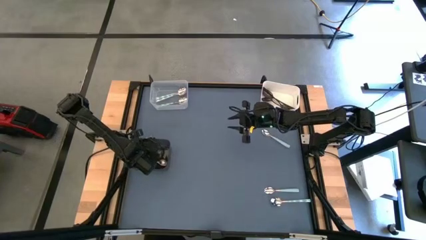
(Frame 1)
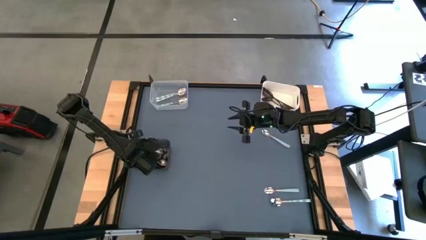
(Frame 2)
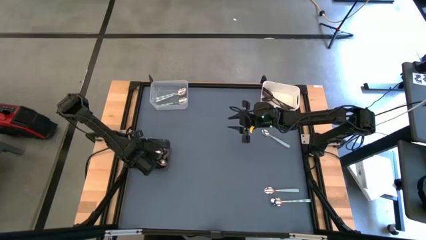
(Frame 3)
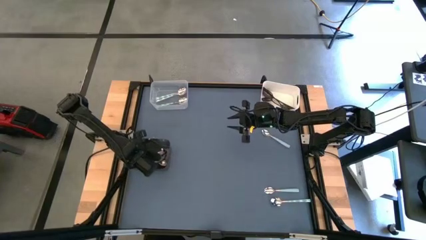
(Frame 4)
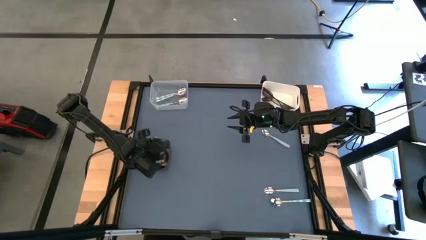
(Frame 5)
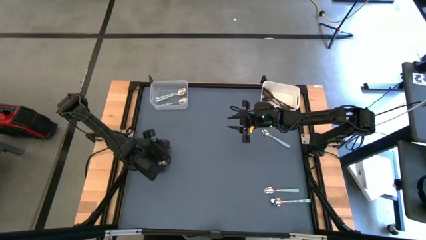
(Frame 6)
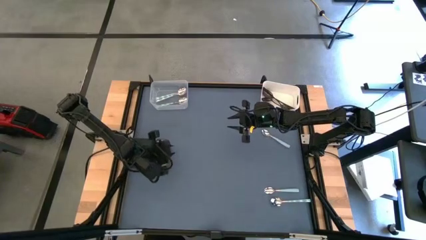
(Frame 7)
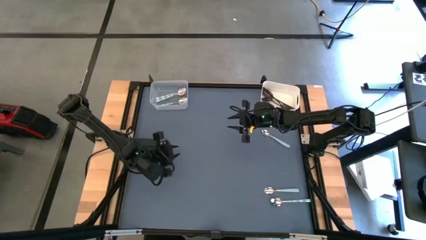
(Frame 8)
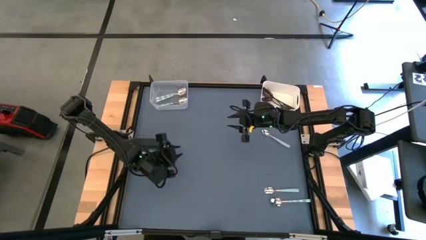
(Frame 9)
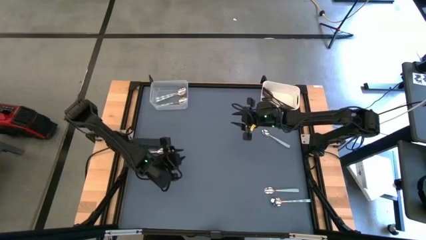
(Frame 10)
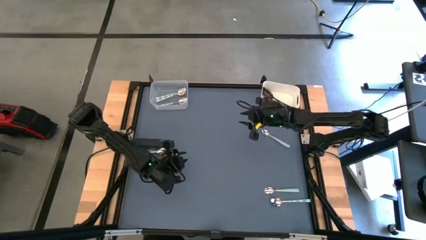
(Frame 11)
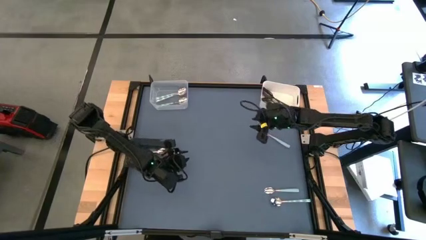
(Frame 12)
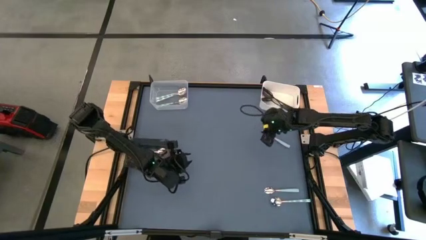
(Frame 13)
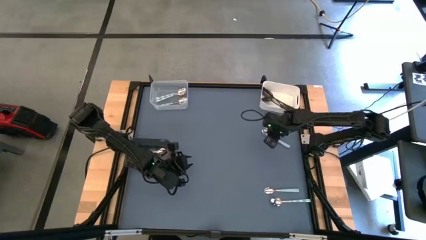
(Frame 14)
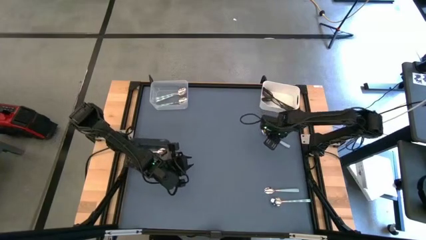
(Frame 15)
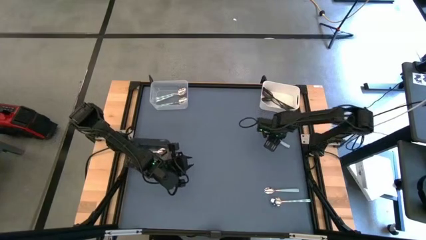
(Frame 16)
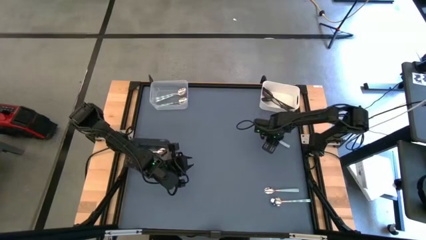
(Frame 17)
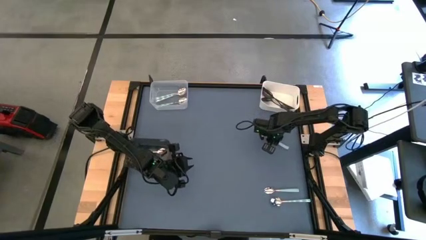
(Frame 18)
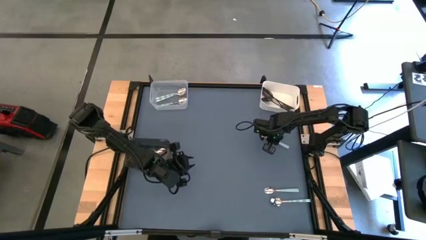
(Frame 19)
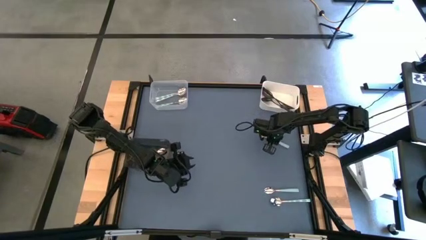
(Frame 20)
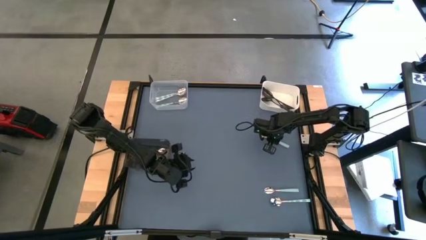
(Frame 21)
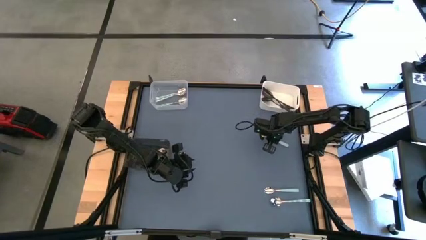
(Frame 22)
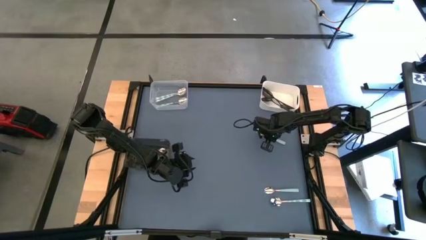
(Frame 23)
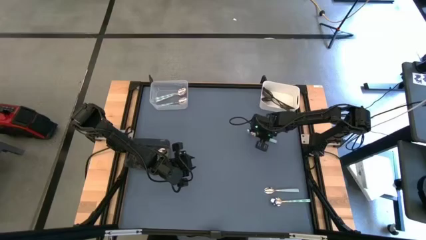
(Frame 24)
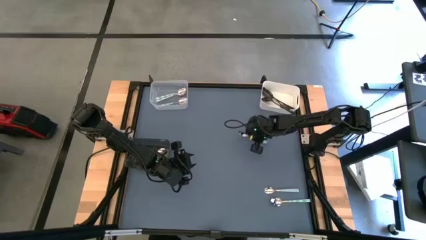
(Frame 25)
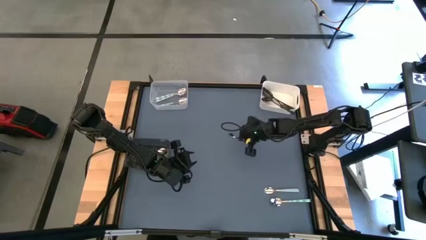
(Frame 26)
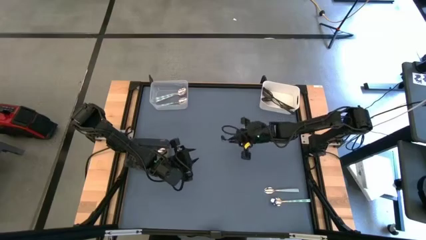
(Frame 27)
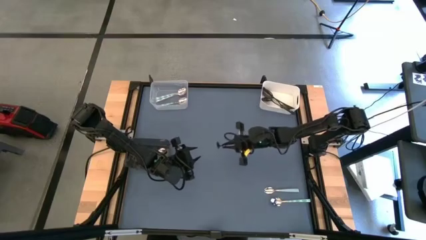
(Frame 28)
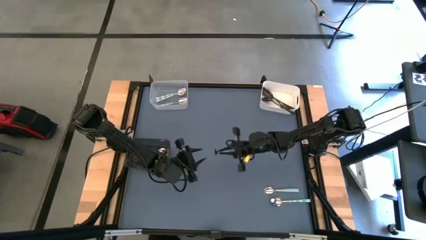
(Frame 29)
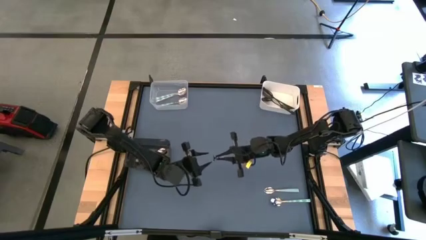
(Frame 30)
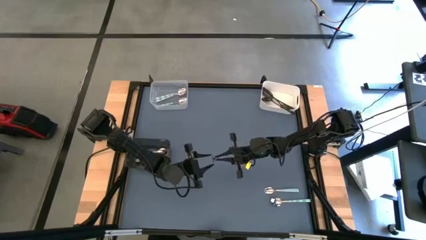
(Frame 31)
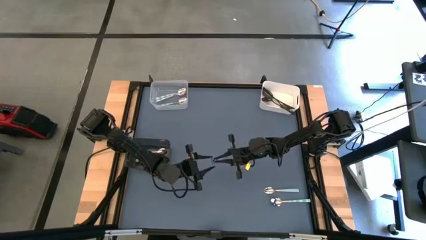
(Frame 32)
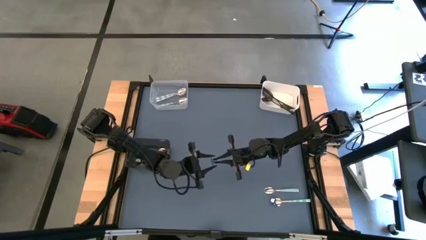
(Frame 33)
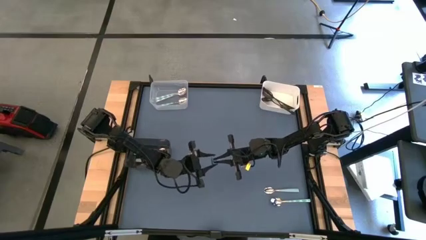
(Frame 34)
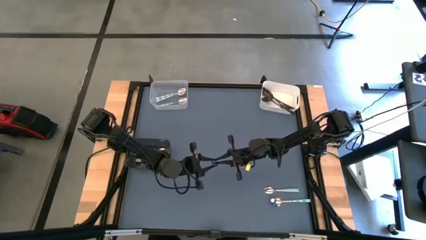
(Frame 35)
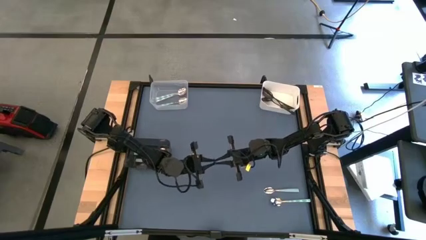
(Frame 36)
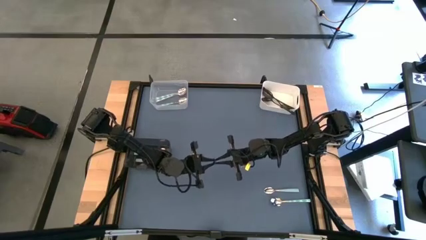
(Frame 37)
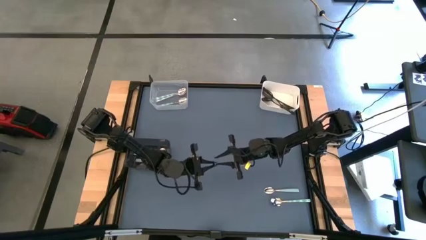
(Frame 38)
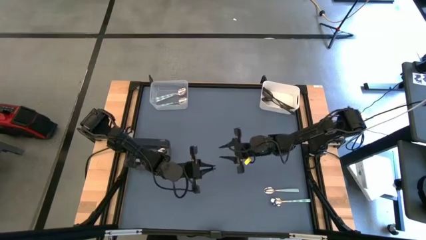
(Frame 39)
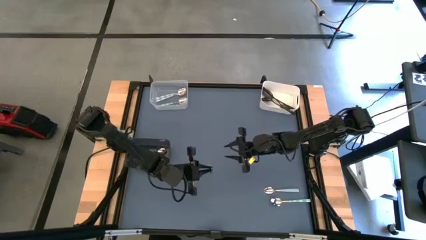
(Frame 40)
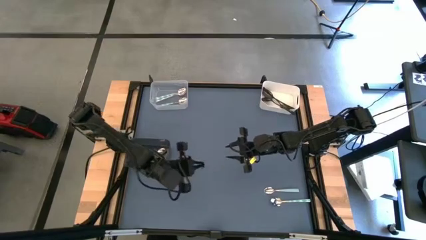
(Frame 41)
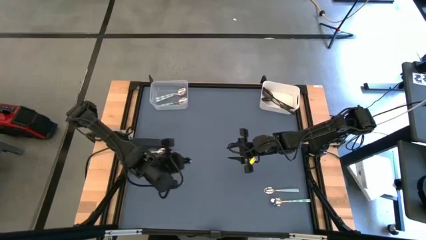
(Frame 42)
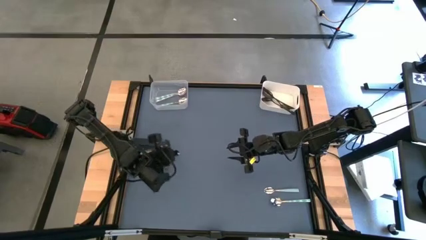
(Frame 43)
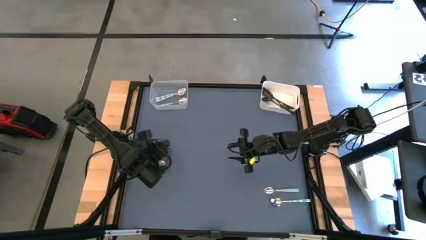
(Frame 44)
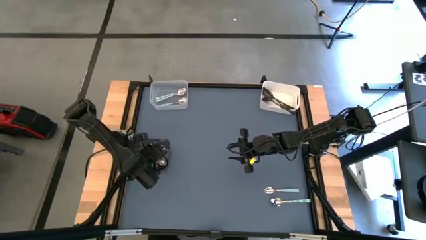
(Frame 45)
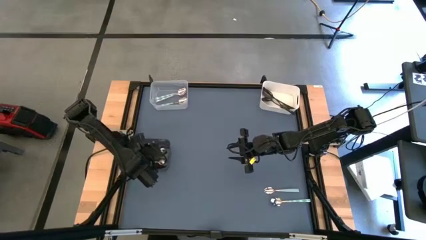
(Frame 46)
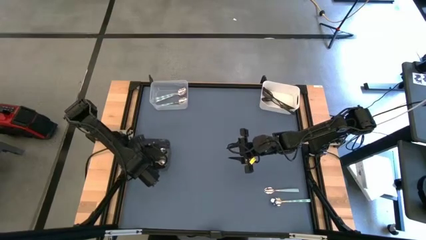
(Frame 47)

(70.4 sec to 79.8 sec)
Task: Sort silverware by color (type)
Put the blue spoon into the black bin

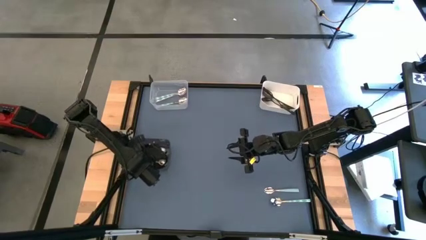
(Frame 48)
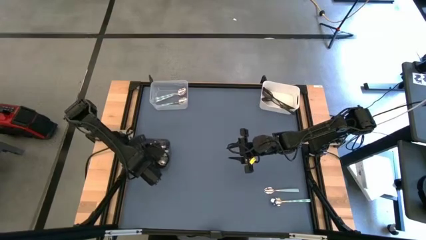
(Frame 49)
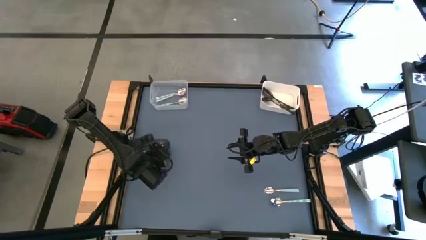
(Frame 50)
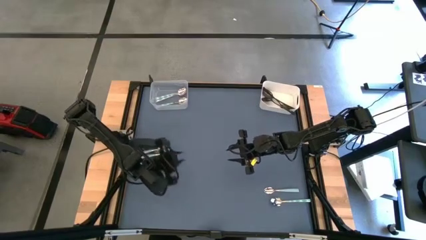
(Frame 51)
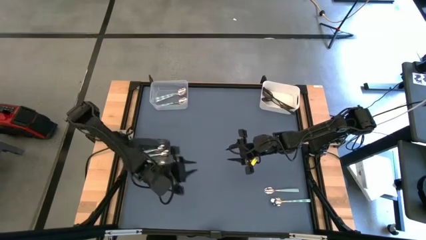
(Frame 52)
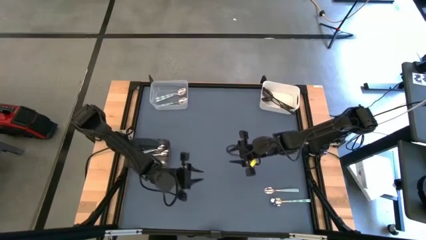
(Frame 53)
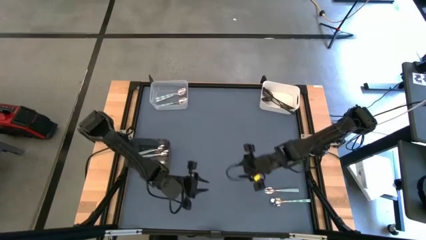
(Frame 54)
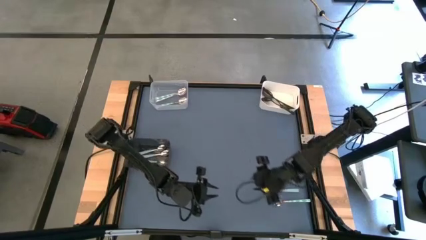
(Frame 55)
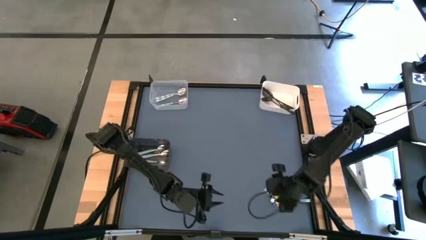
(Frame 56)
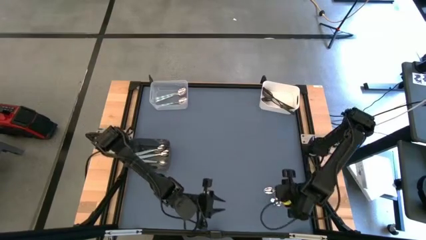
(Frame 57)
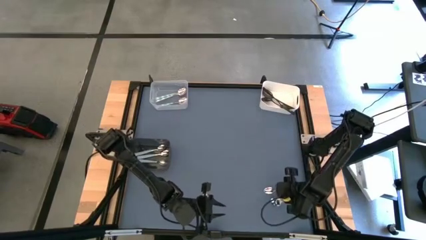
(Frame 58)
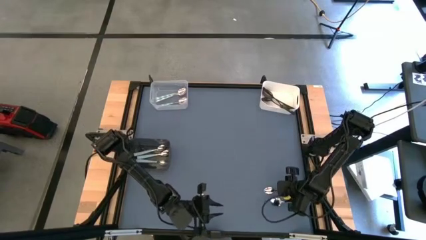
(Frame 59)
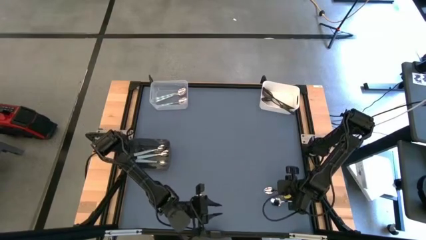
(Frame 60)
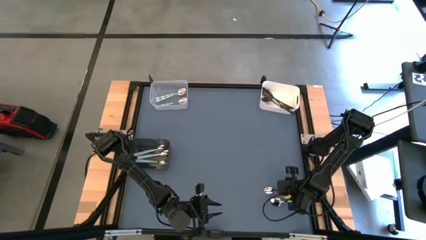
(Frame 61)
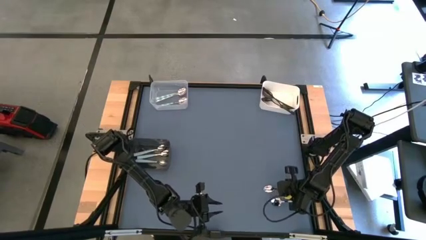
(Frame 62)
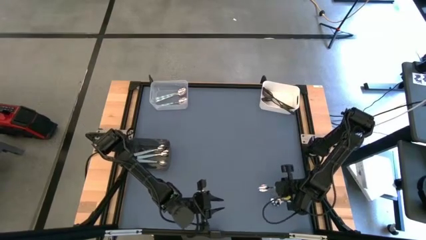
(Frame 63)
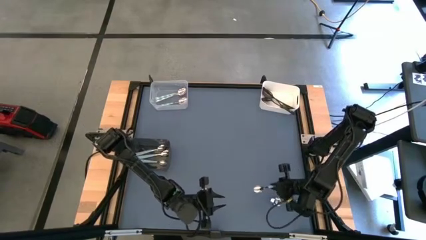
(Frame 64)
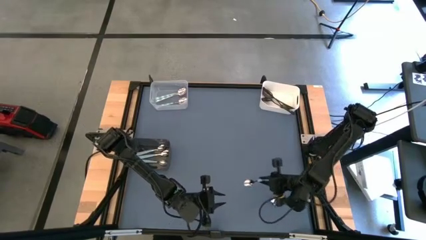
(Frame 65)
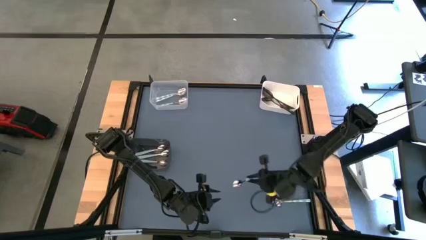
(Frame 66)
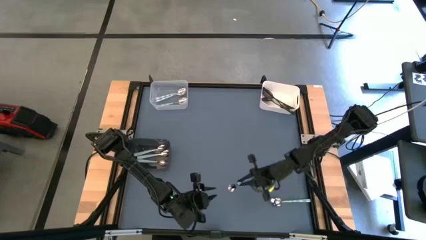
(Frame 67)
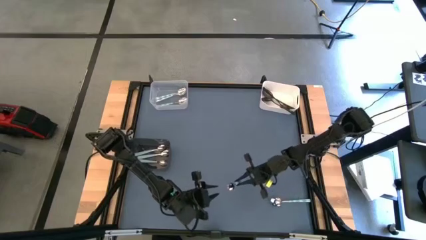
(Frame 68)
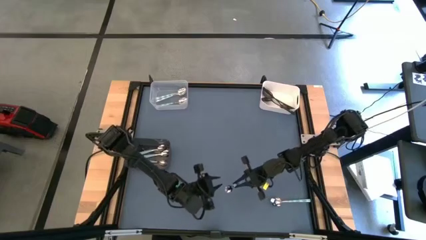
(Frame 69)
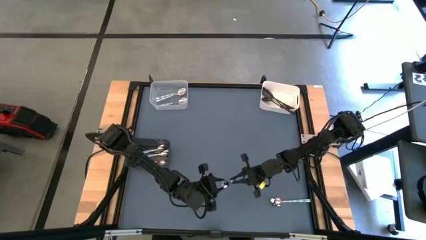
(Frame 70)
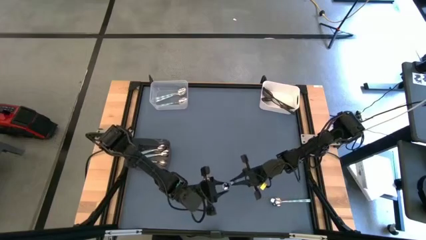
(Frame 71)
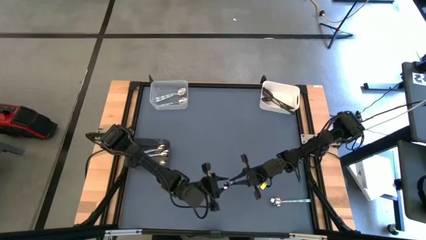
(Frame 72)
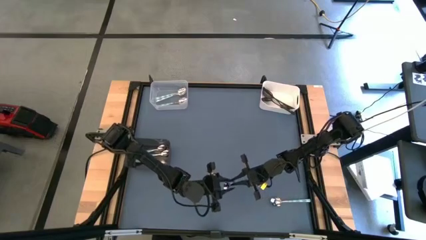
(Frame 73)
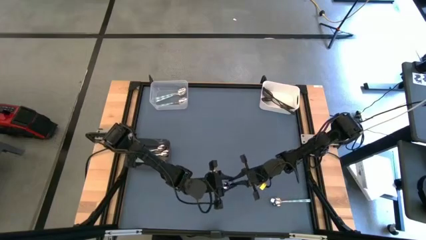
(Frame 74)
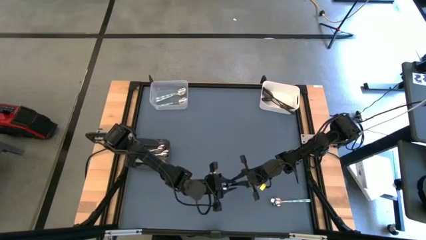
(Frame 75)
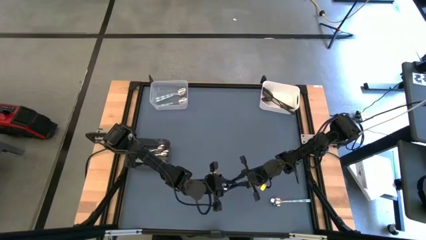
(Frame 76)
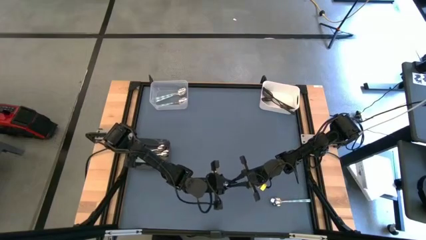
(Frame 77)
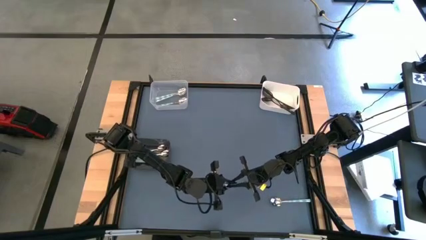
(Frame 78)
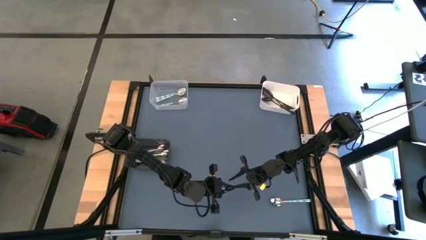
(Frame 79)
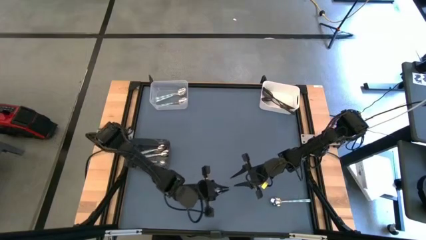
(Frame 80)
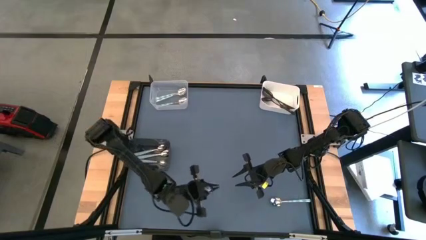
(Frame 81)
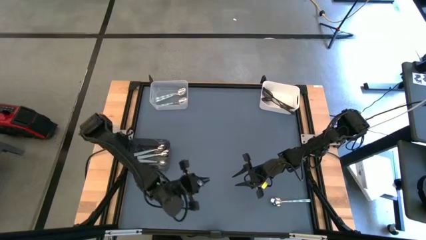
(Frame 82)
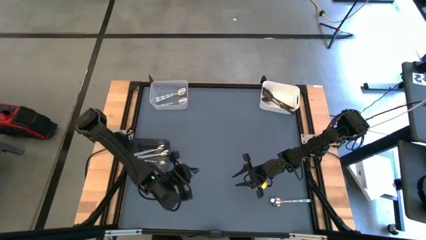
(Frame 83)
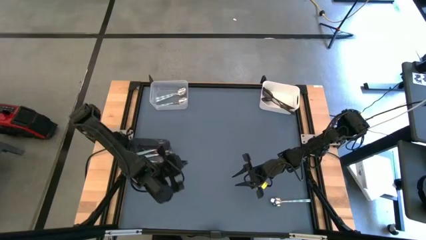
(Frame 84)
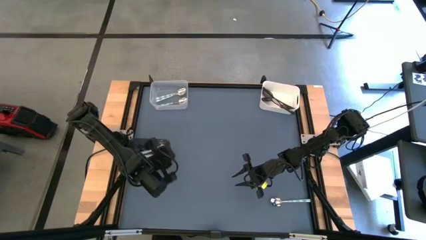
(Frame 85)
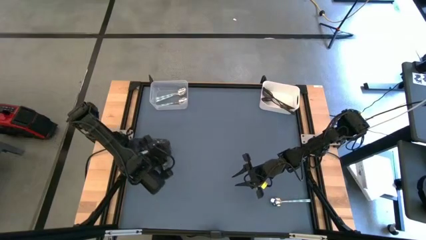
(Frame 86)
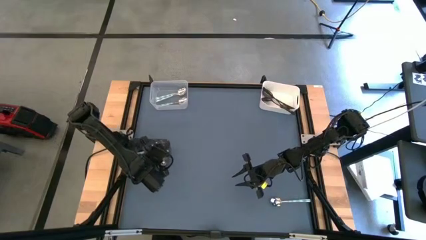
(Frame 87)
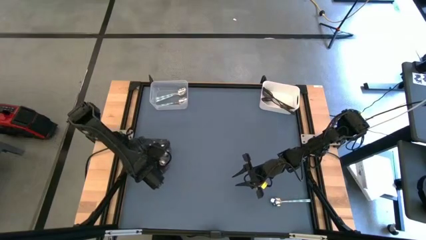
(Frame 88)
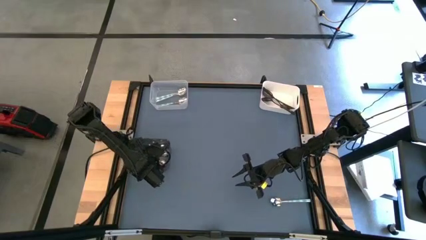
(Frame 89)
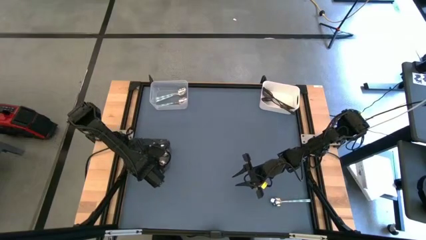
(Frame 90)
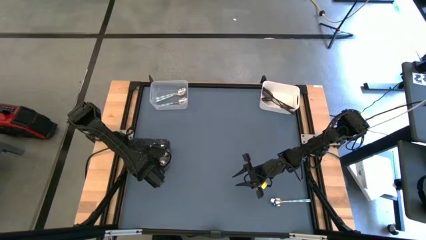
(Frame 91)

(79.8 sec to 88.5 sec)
Put the blue spoon into the black bin
